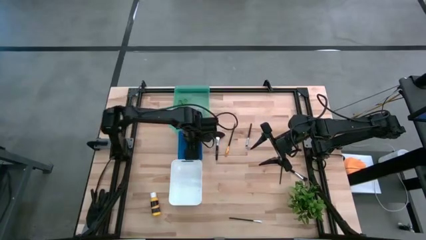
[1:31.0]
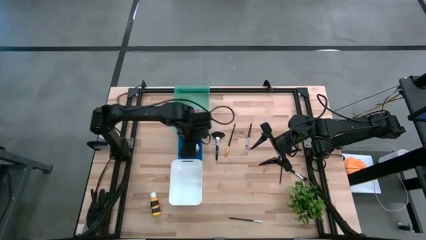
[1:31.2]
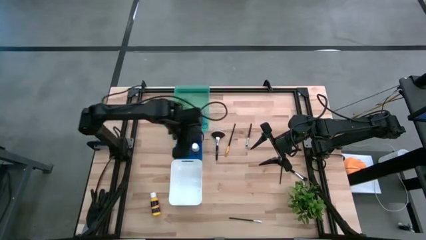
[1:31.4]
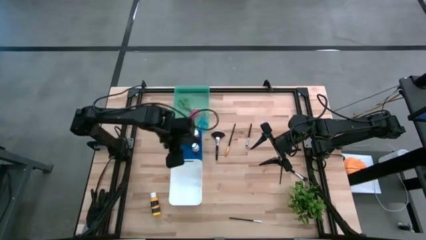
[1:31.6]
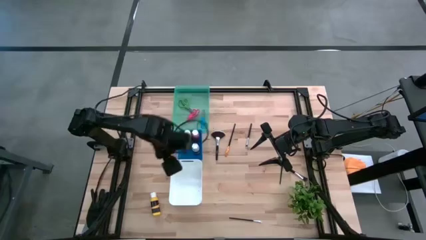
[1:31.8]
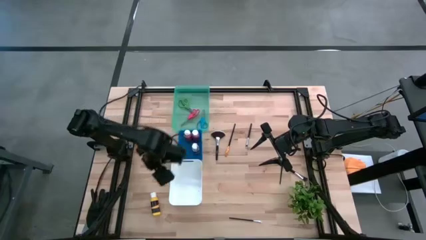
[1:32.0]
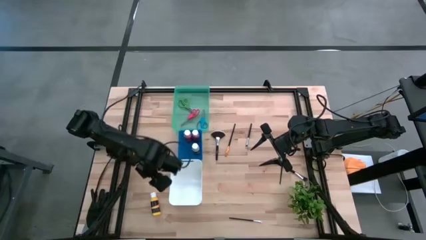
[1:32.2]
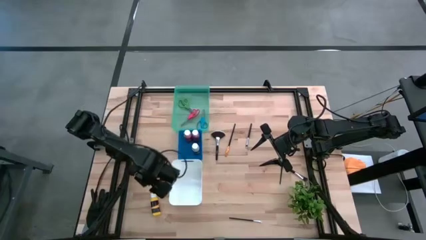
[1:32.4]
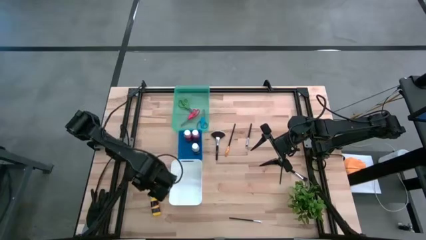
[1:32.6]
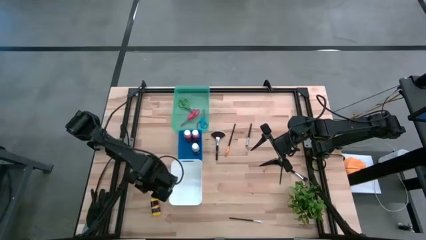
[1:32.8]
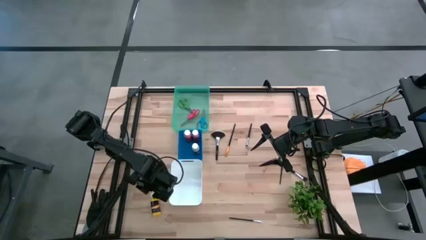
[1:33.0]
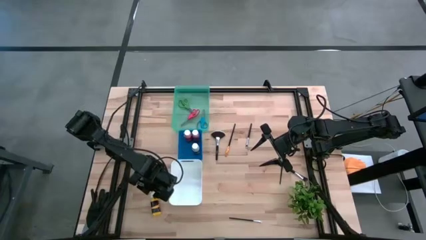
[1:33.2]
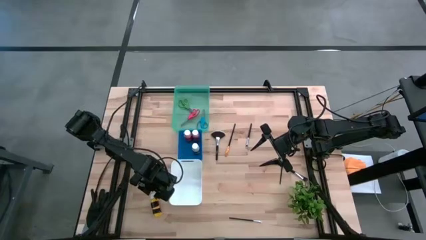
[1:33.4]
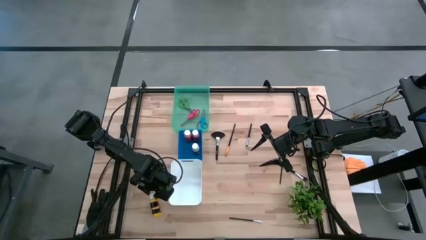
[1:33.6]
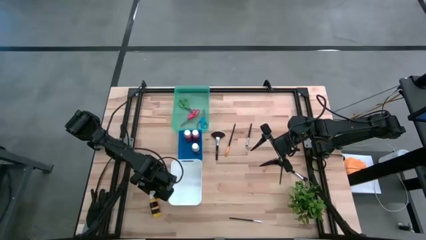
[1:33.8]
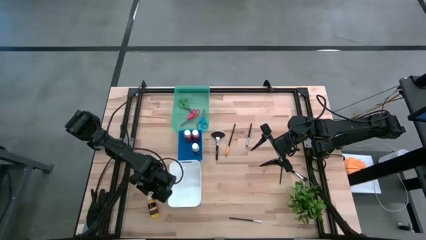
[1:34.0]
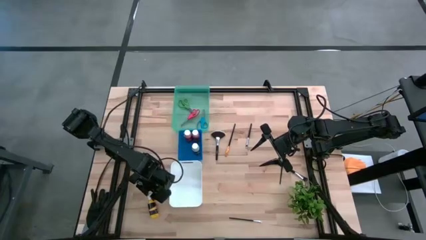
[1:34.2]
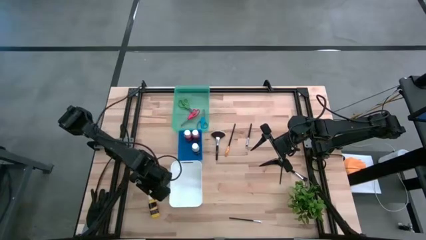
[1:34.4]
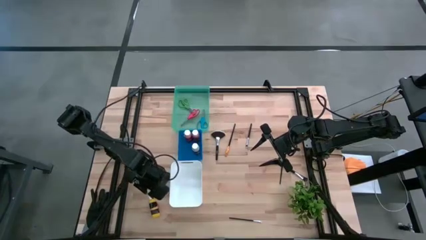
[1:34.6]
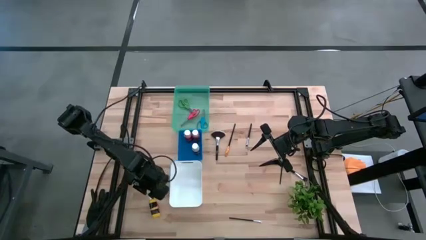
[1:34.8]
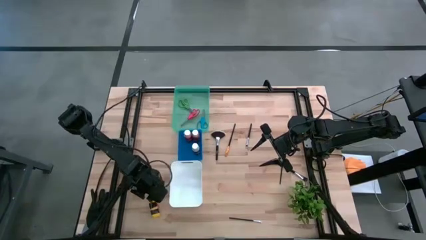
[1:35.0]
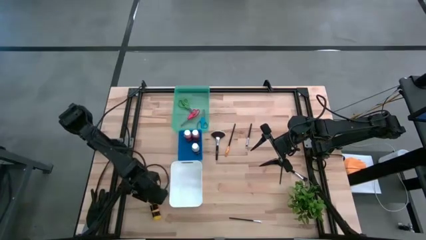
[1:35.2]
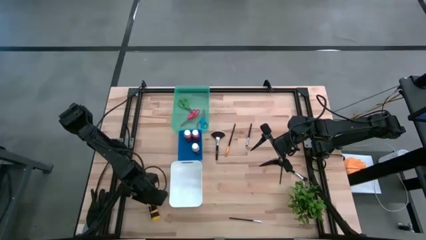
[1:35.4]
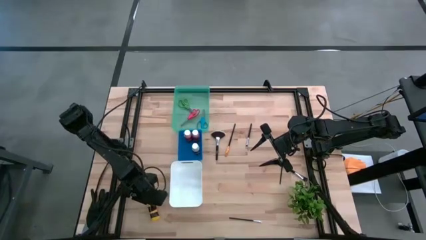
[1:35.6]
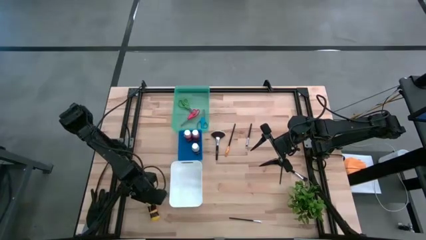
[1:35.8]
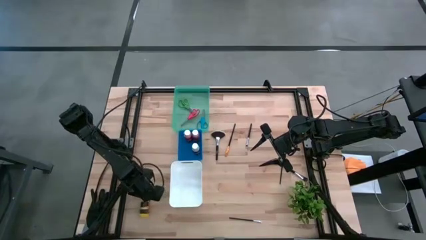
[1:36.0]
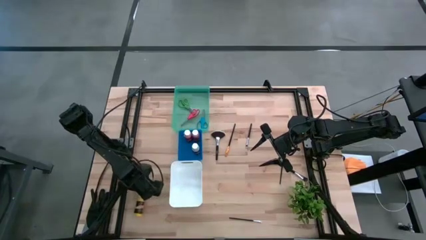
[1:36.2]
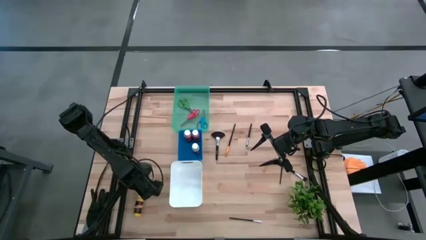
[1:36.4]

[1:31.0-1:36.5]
Task: Pick & Place Paint Supplies
Put the yellow paint bottle into the blue bin

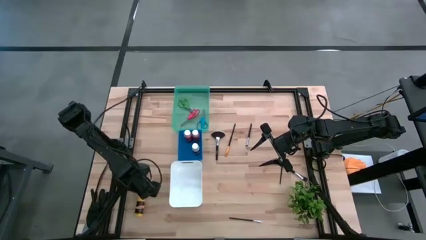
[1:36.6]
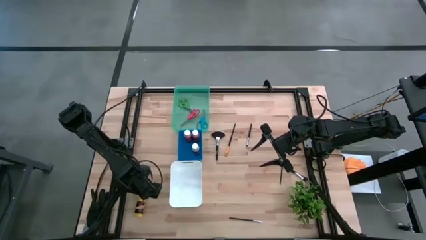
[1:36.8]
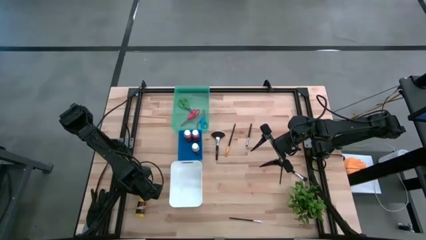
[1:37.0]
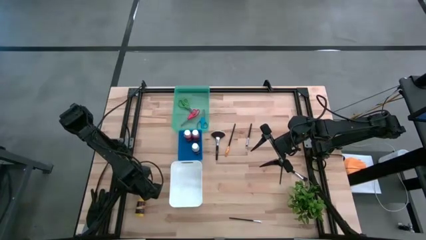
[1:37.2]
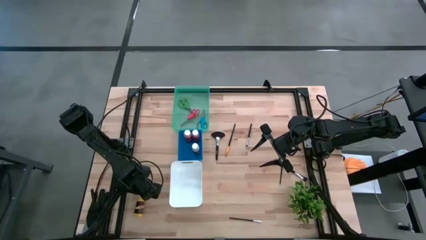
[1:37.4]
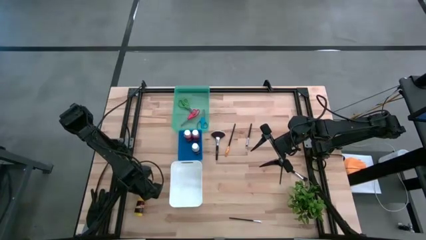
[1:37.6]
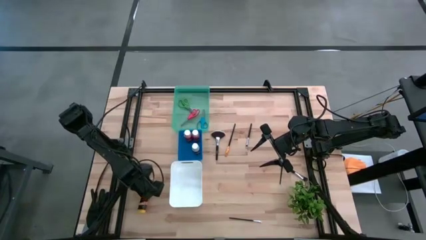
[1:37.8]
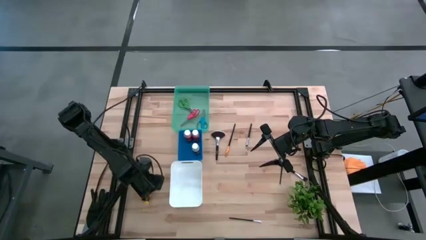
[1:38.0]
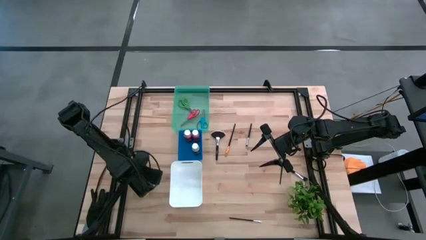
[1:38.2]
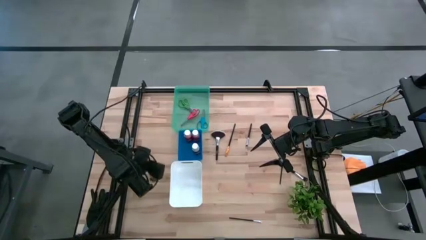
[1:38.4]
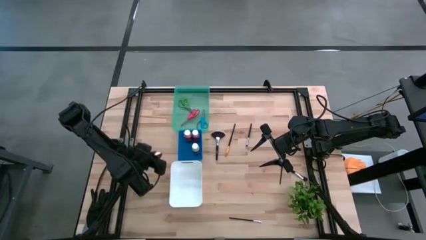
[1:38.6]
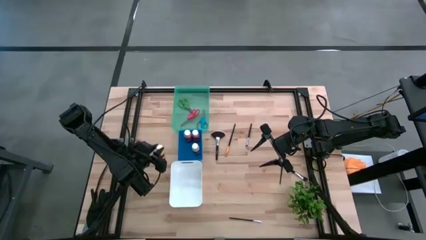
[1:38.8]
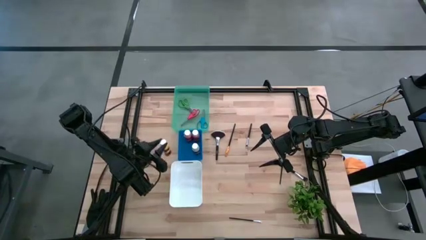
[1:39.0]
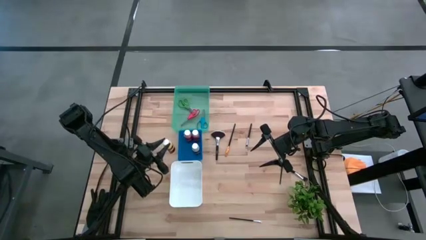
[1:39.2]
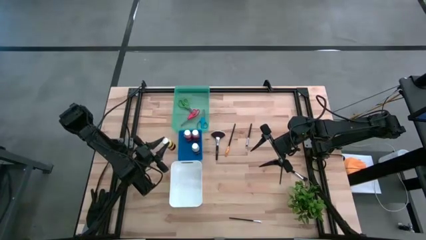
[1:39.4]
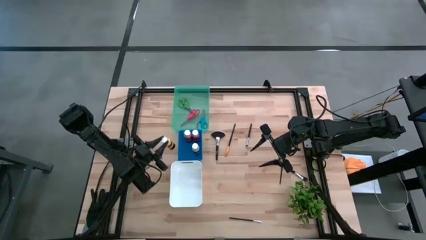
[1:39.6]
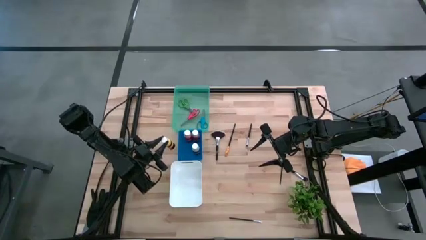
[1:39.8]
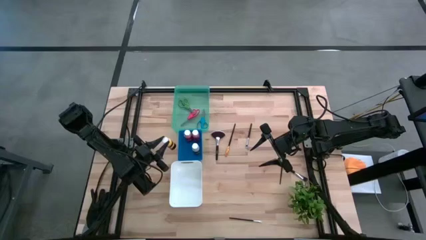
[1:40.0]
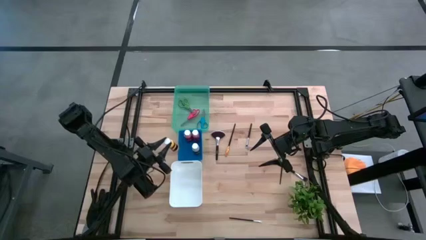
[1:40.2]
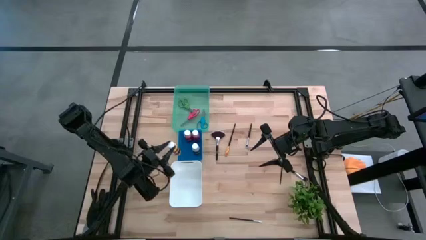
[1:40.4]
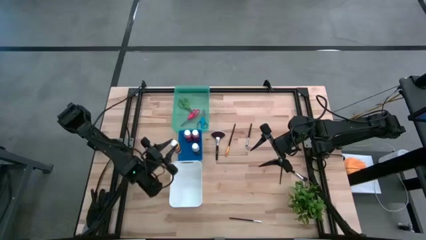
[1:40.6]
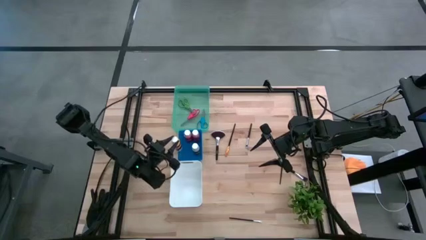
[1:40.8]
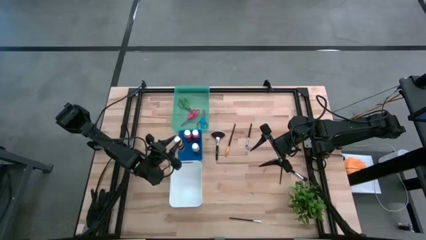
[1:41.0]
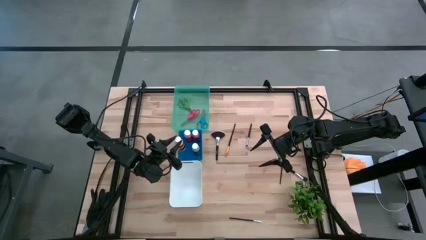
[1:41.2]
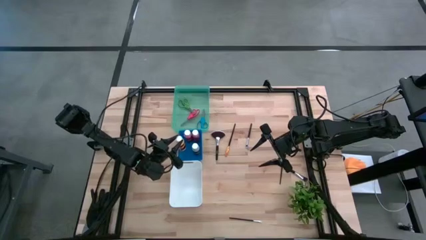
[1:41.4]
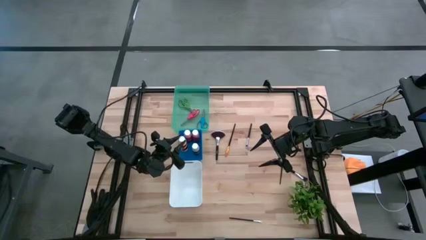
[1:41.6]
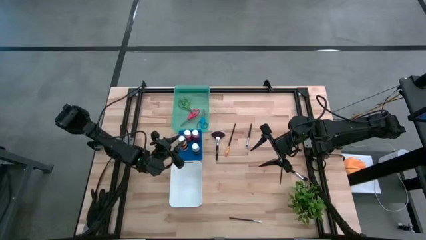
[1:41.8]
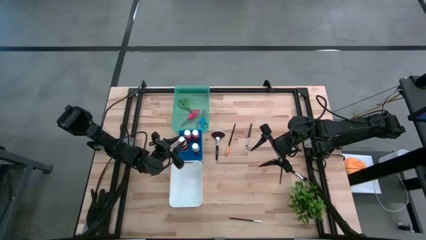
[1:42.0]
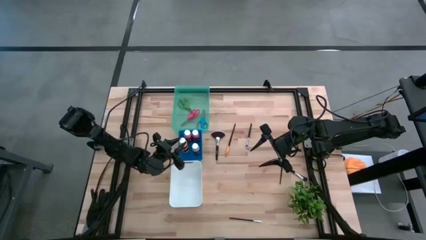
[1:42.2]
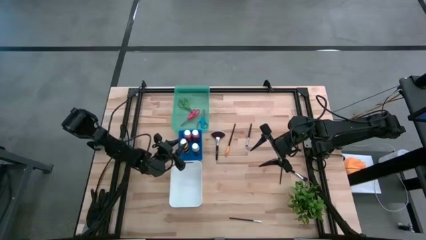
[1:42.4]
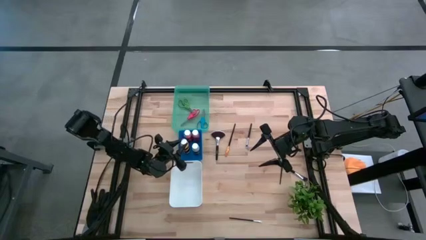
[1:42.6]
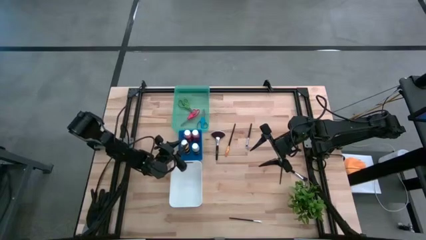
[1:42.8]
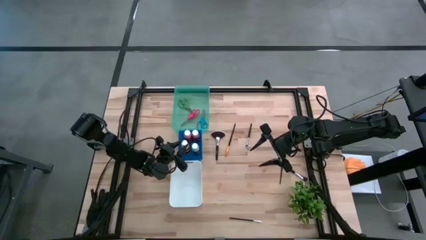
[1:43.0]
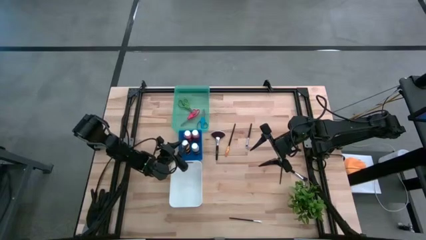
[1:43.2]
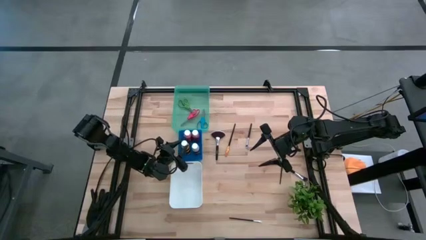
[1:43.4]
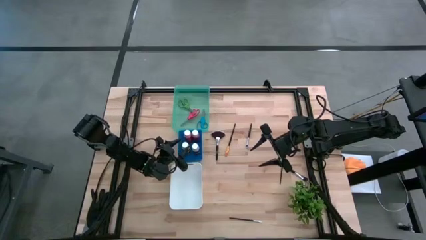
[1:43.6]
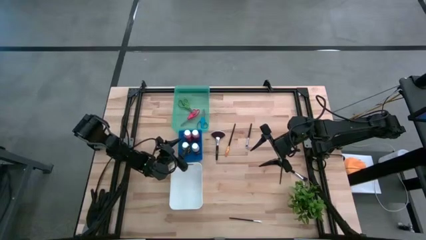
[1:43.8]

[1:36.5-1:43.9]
Put the yellow paint bottle into the blue bin

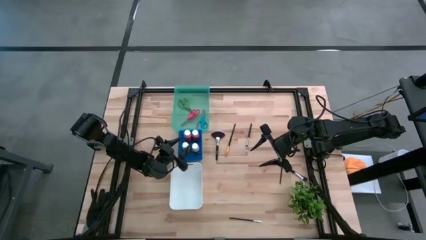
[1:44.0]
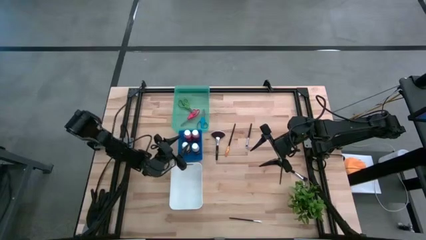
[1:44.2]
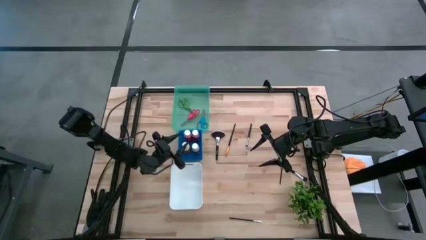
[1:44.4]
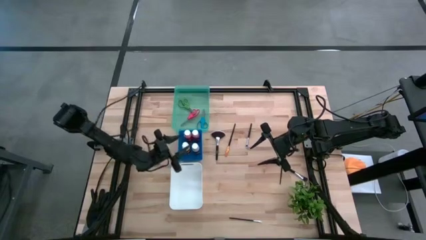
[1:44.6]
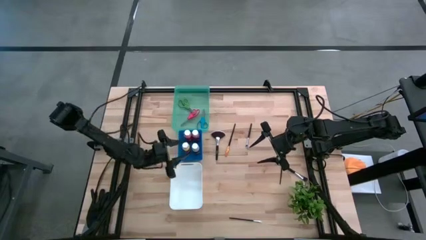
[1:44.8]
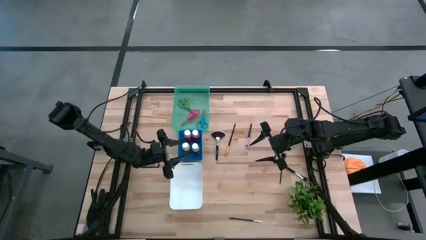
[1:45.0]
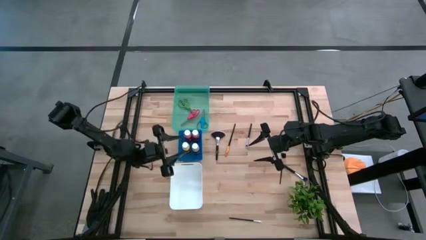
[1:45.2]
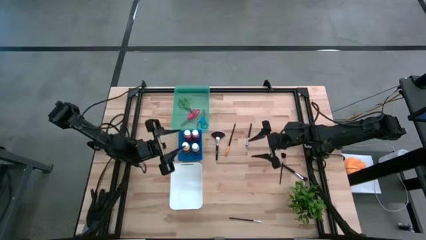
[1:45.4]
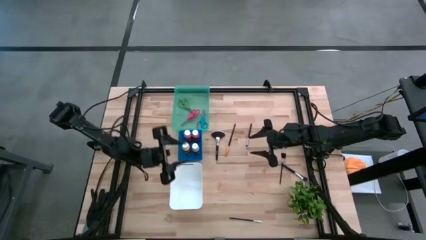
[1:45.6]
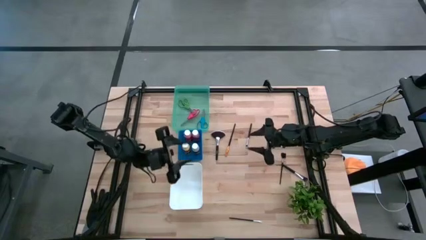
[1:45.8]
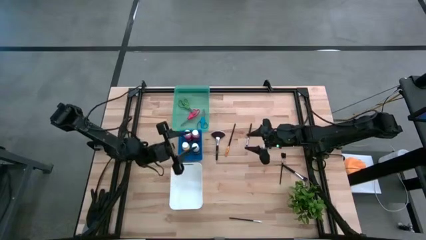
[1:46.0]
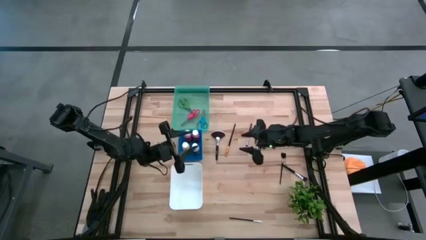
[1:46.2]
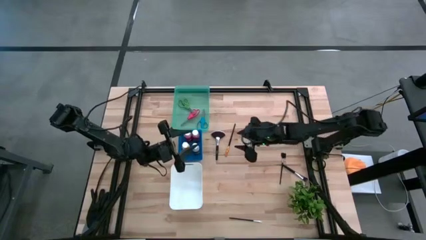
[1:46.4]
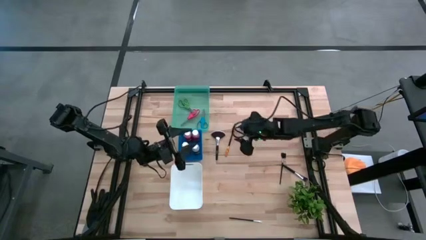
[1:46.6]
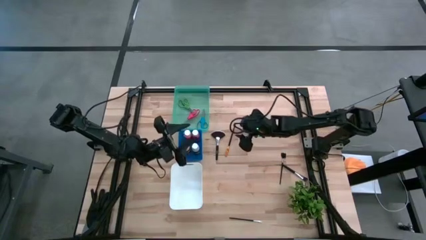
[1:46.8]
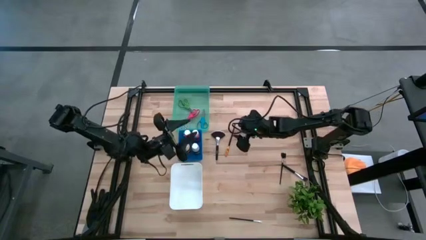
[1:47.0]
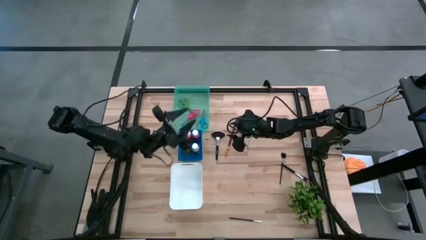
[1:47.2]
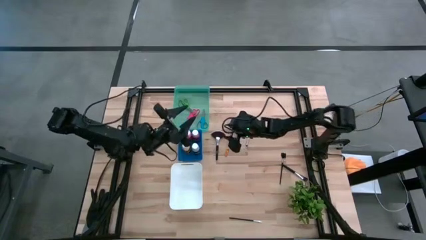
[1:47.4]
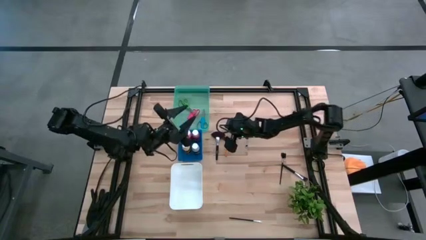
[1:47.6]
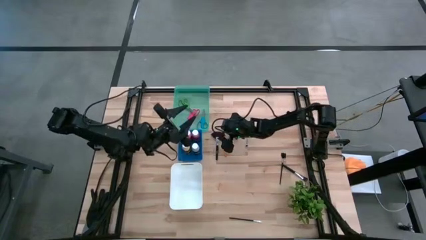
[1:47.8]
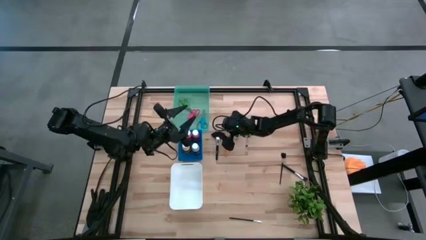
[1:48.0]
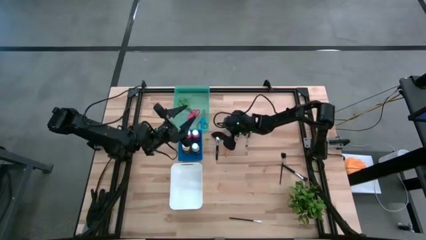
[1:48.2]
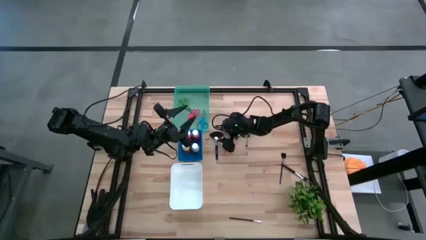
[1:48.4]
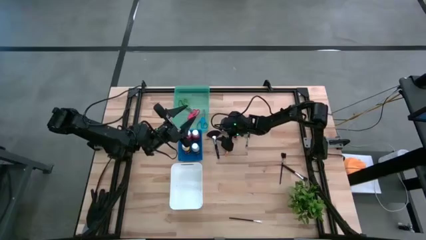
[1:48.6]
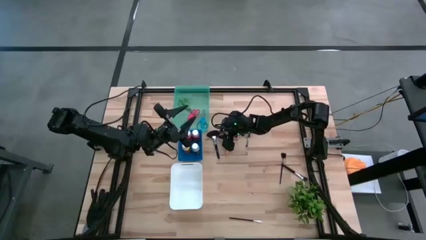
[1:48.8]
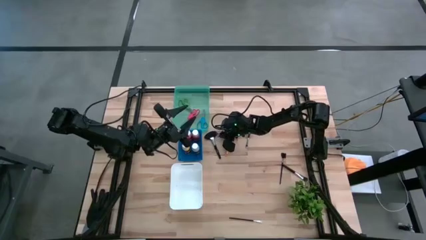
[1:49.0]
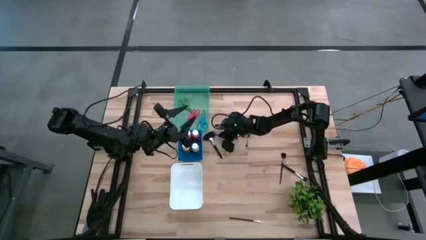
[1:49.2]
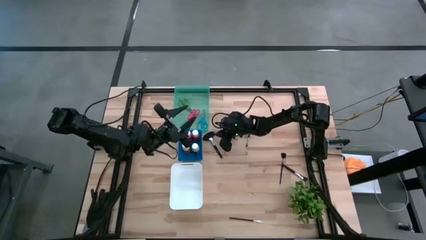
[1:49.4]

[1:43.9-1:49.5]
Put the black highlighter brush into the white bin
